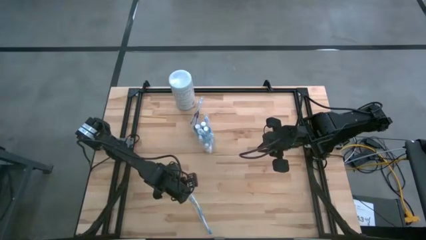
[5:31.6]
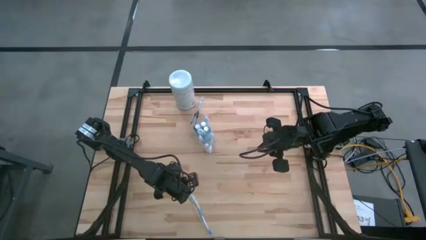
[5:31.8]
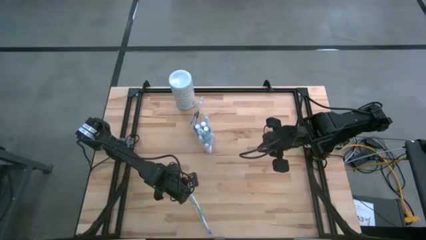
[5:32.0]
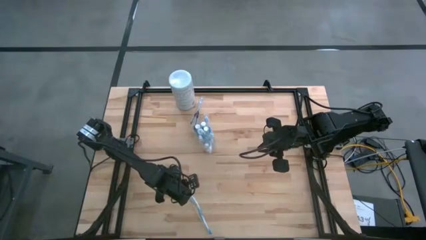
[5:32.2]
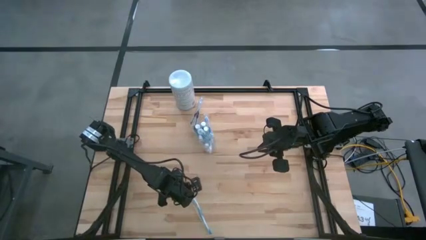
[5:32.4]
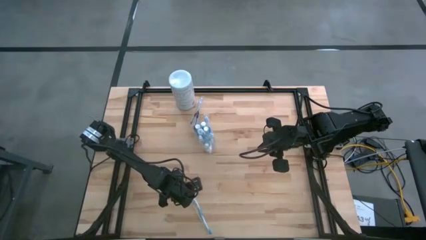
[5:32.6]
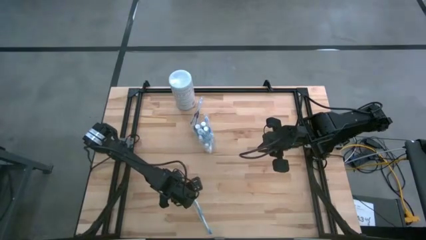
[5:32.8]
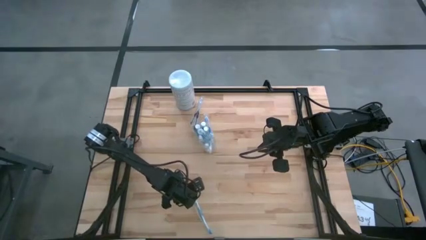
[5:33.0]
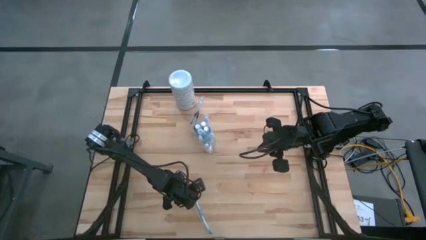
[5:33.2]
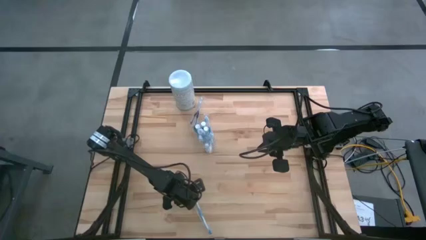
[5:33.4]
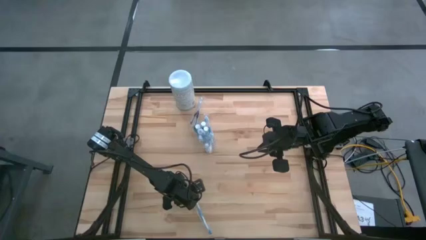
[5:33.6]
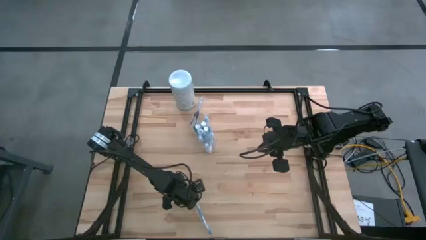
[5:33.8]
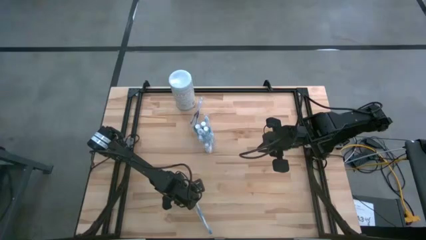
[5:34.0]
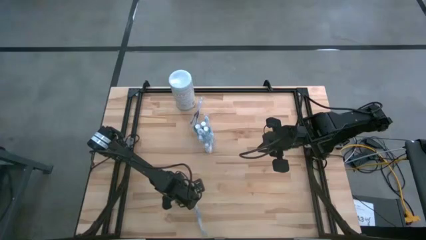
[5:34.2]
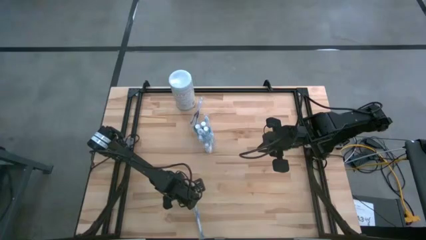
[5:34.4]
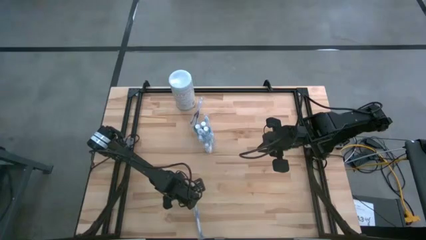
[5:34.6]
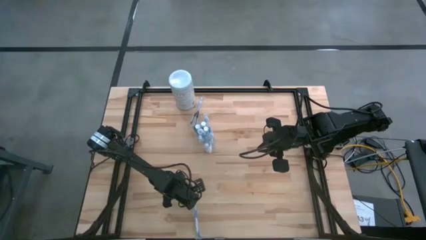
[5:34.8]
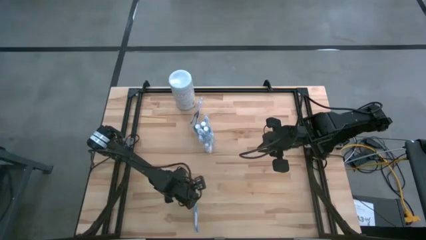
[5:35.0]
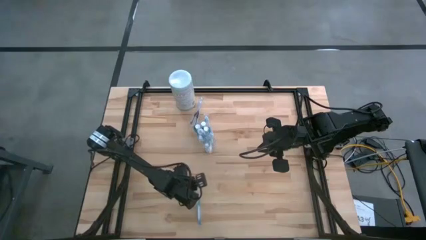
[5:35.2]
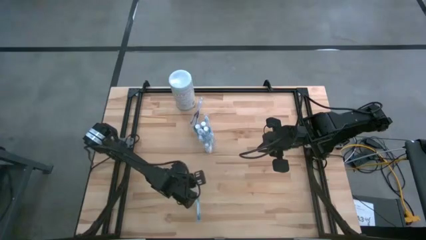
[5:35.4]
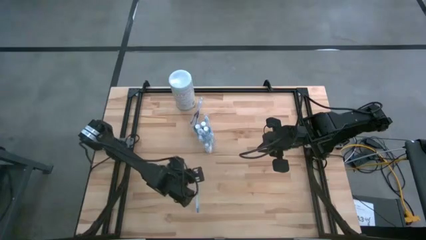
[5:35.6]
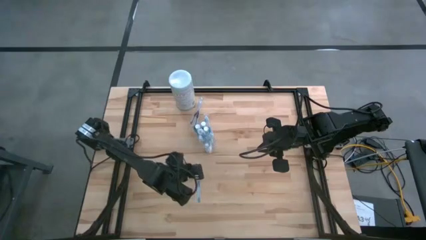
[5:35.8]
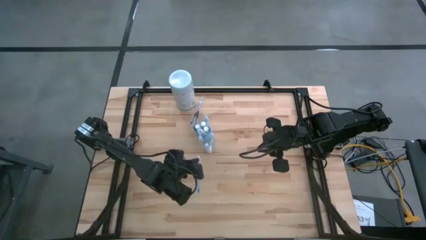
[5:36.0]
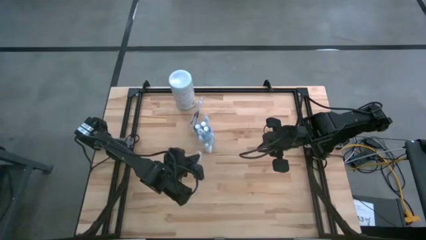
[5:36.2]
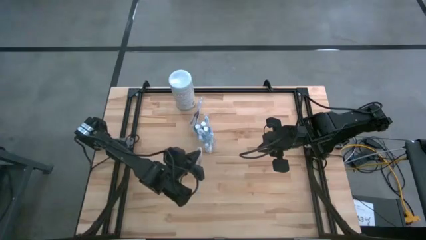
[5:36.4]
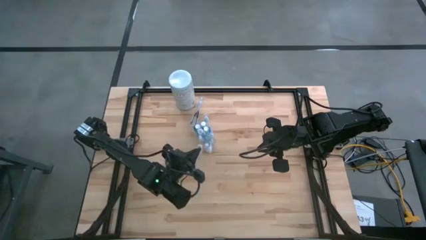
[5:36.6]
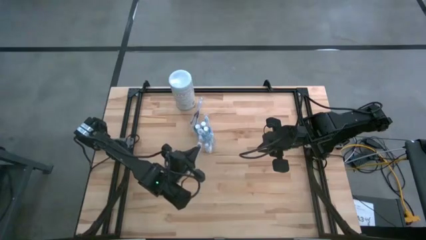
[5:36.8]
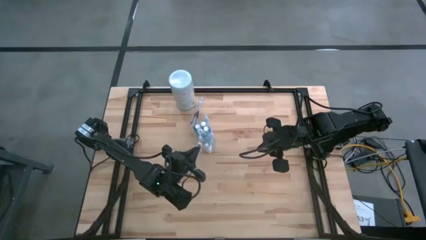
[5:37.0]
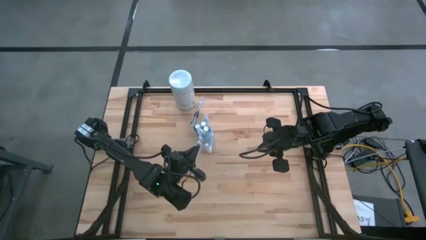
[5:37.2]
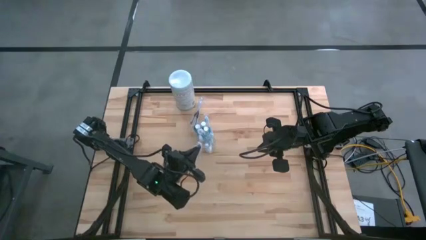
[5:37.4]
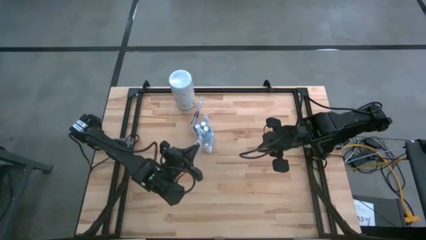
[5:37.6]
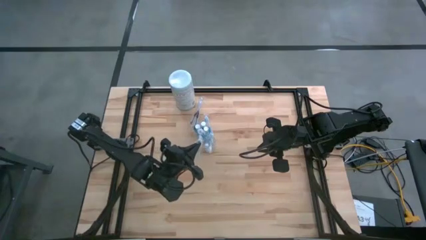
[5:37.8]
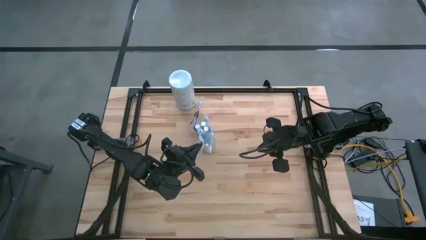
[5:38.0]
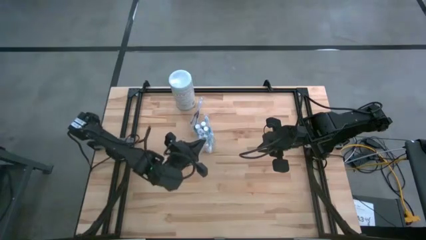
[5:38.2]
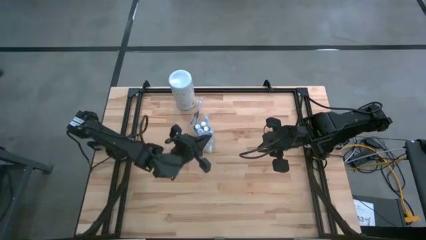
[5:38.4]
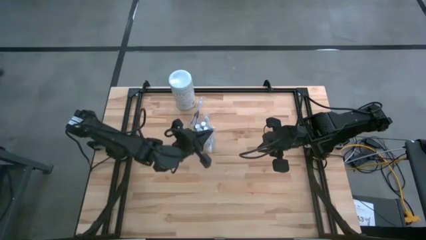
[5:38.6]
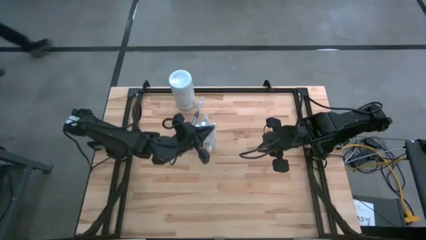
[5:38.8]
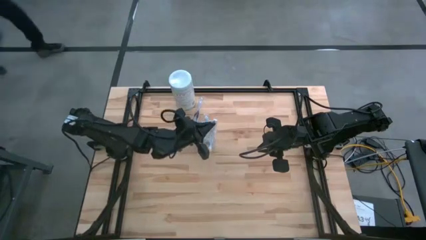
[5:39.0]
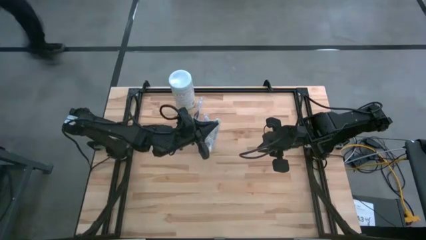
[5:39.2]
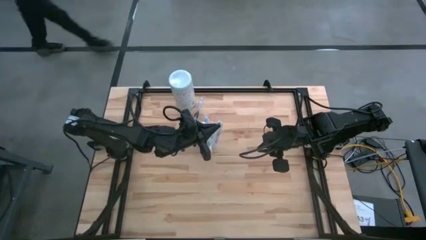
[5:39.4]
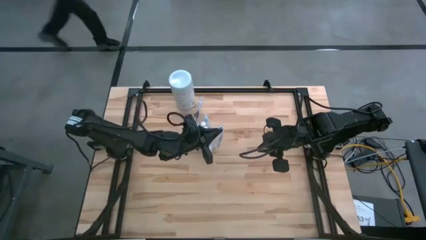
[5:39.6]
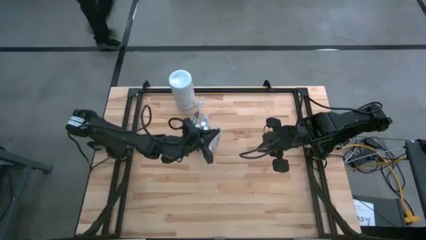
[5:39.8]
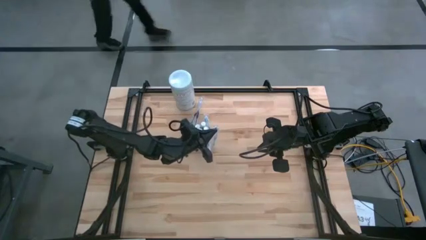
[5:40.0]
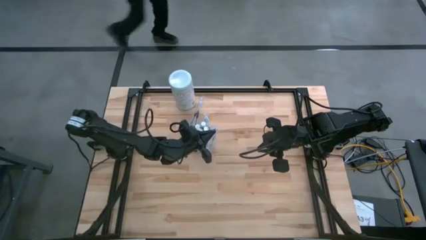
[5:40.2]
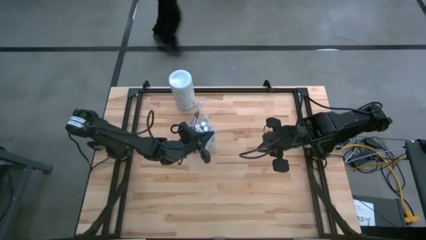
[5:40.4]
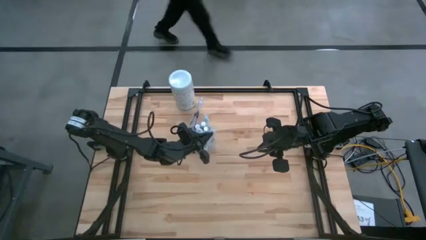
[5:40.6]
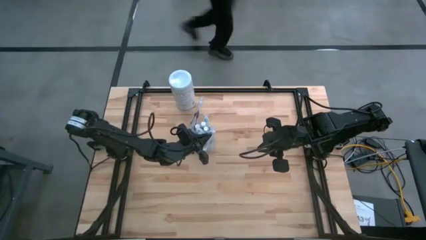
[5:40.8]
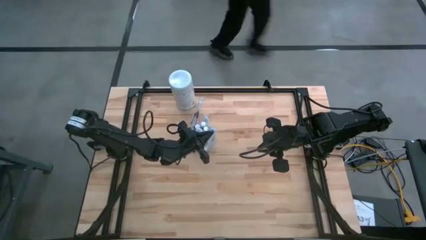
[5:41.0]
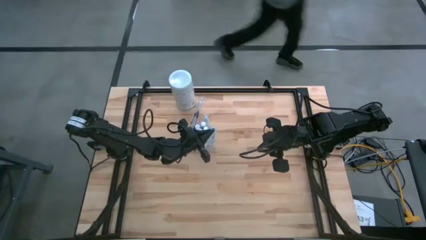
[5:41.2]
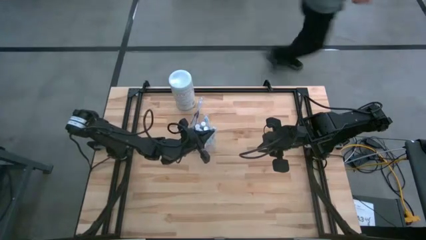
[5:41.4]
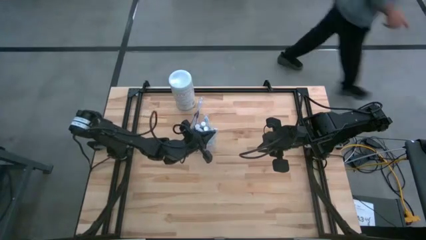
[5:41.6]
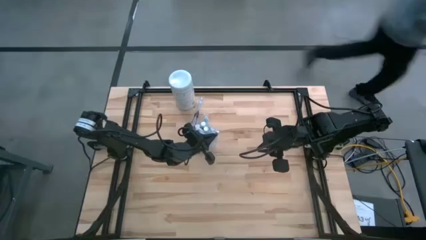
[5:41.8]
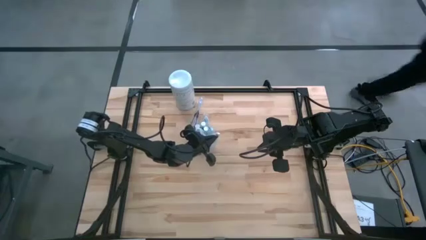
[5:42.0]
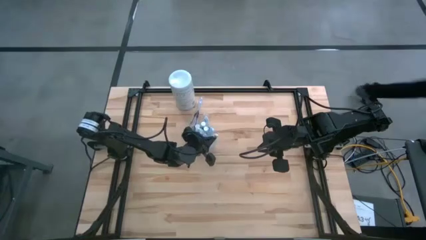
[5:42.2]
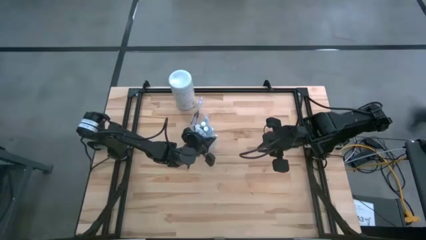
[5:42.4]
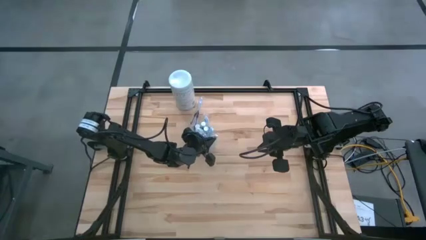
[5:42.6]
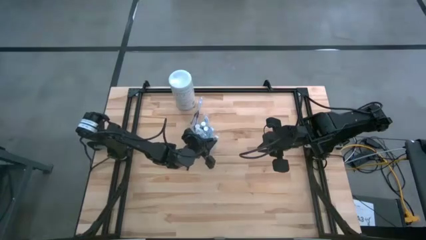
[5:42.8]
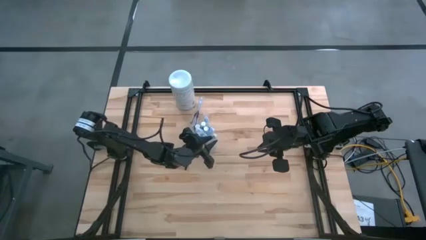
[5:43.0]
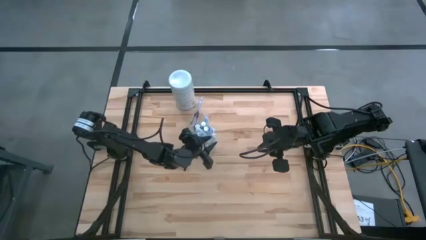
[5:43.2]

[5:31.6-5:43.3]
Task: Pick & Place toothbrushing station
Put the blue toothbrush into the right of the transparent organizer

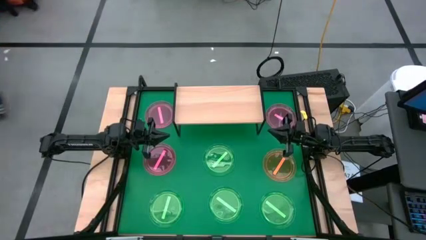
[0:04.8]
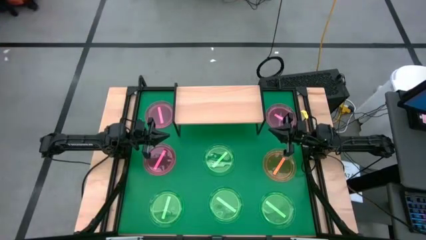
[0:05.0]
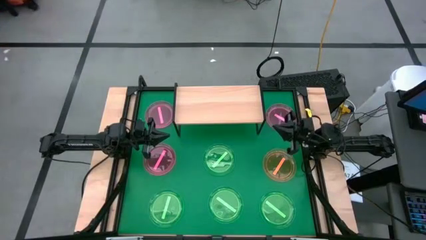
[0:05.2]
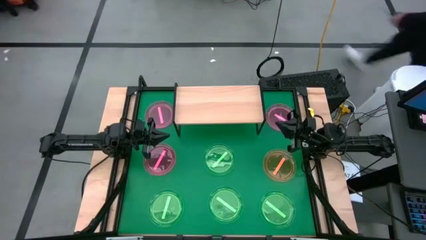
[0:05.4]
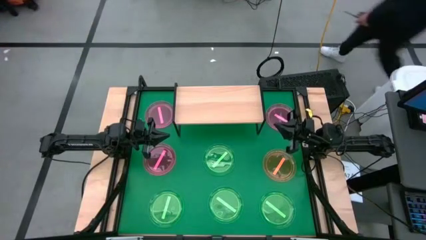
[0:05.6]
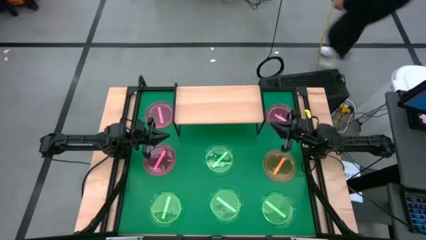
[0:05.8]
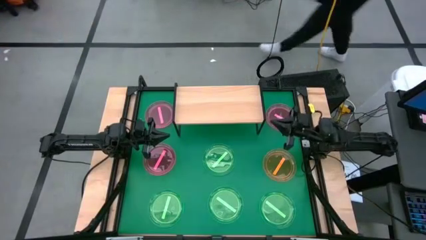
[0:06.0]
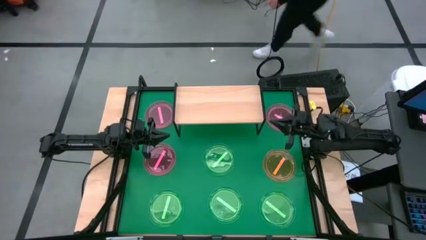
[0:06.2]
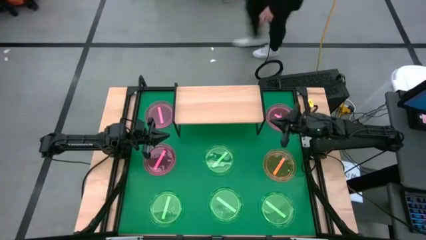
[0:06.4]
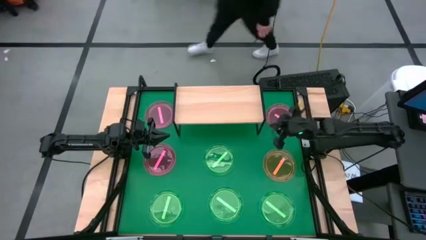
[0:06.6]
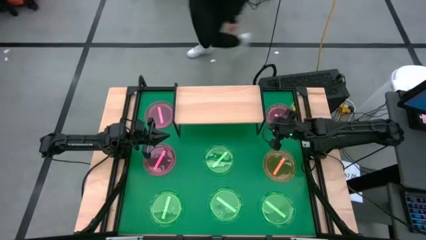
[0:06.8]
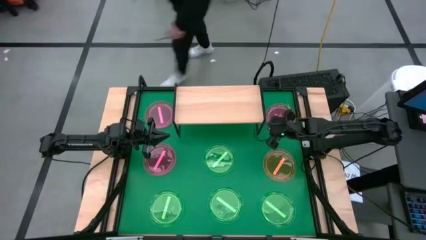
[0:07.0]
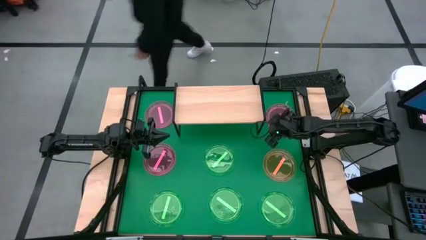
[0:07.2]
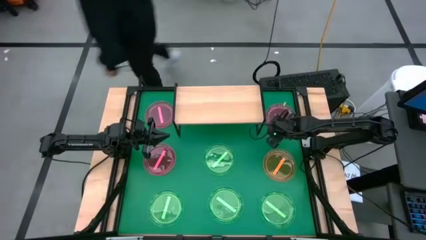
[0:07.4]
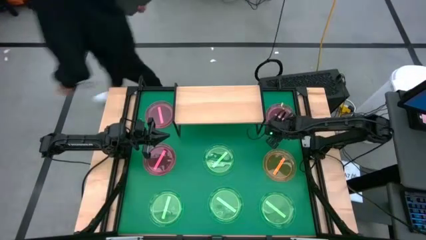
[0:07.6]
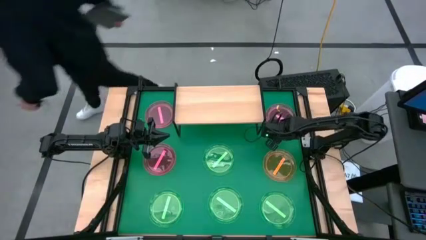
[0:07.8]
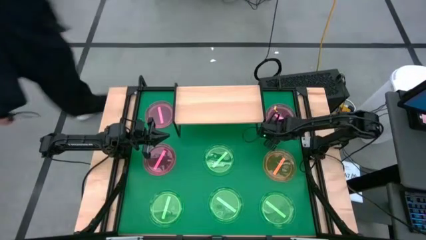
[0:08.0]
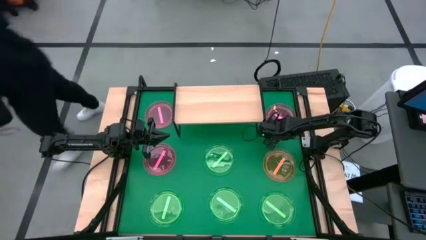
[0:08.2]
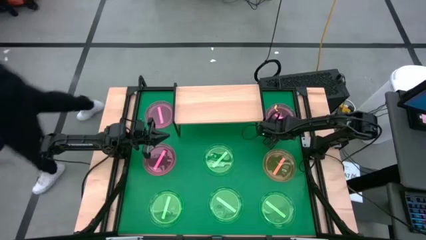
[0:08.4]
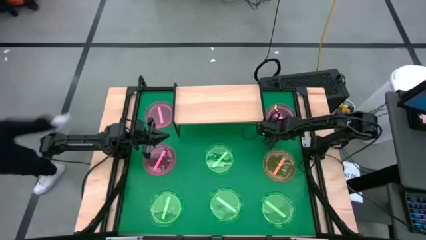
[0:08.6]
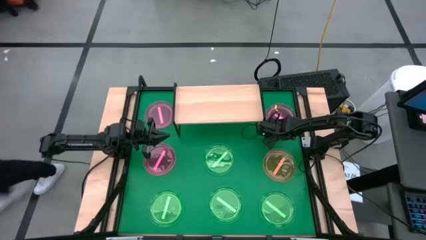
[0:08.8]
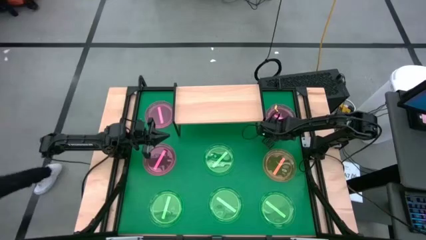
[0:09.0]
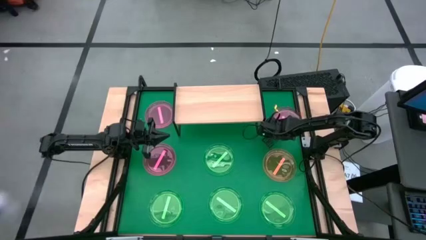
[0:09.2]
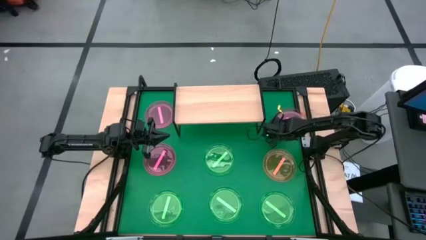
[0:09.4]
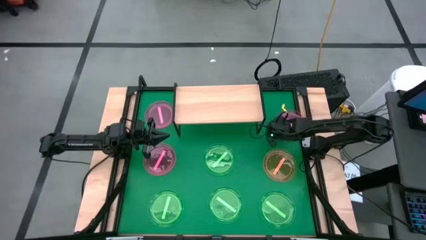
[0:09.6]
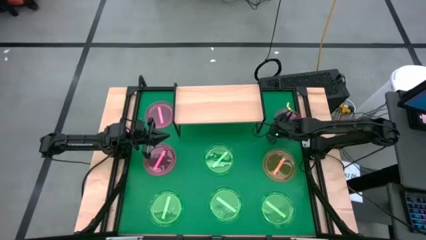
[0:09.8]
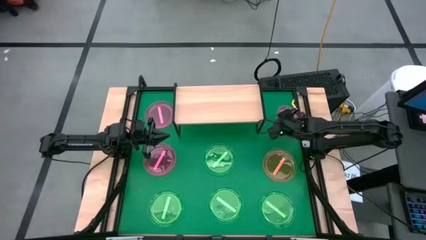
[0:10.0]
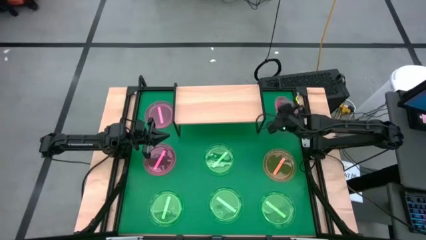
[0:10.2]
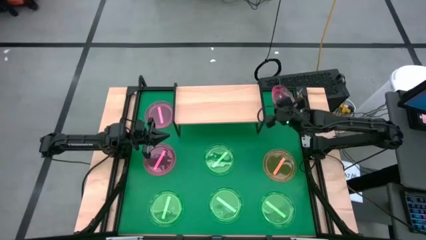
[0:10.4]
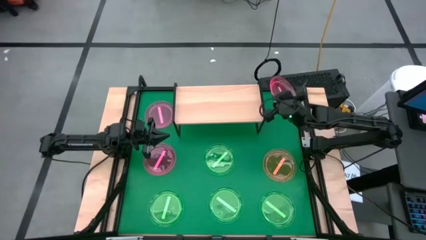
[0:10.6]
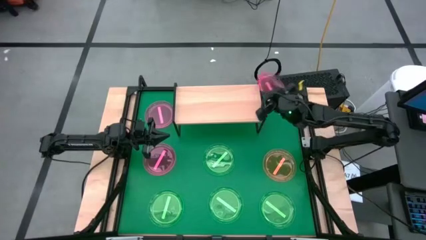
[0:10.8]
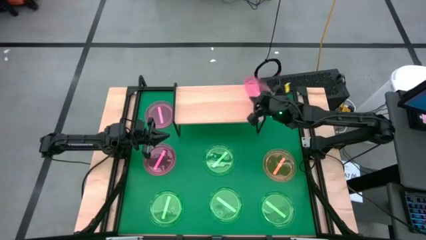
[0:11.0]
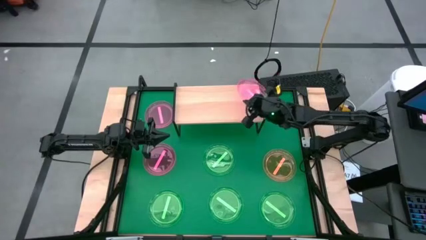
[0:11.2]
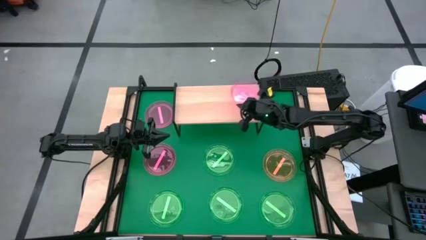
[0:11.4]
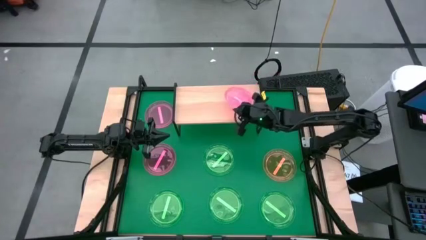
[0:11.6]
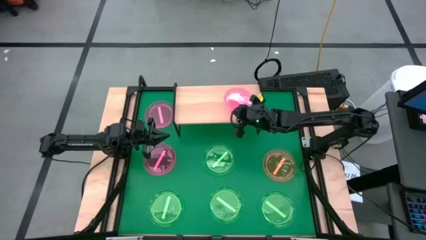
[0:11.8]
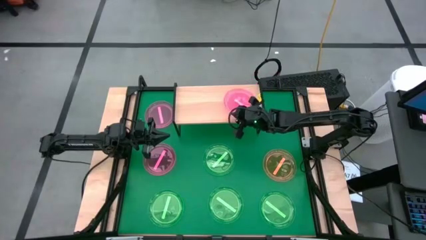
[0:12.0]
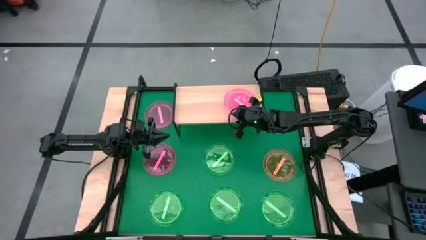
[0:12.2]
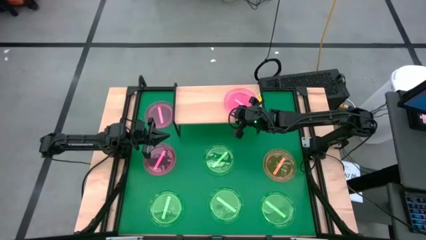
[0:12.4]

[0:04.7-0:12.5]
Task: Place and stack plates onto a shelf
Put the right pink transparent plate on the shelf
